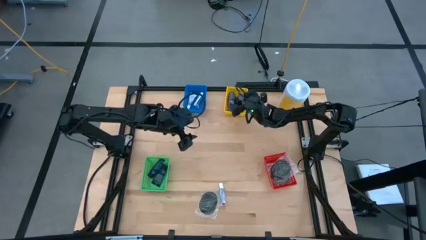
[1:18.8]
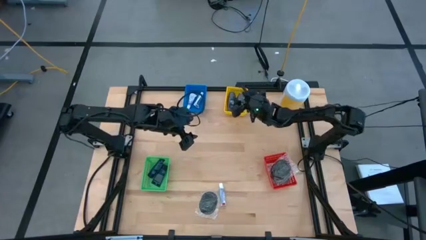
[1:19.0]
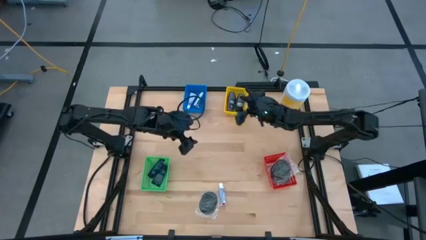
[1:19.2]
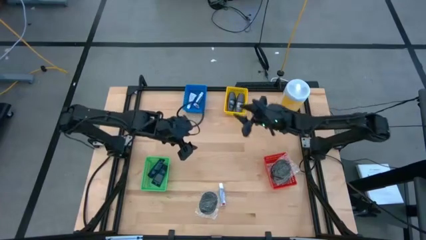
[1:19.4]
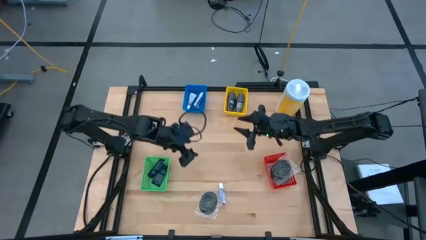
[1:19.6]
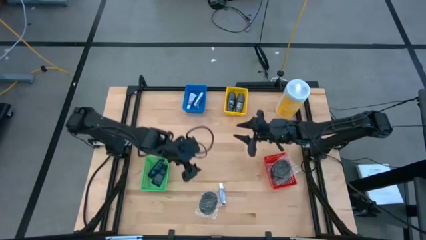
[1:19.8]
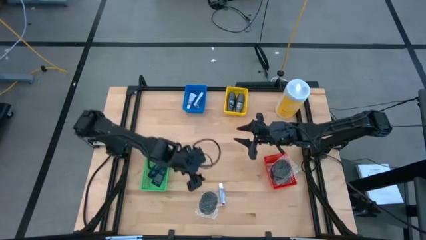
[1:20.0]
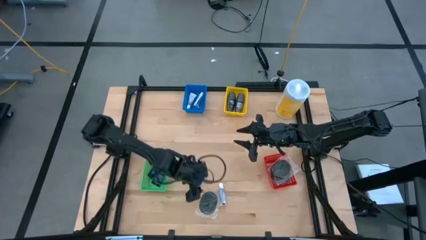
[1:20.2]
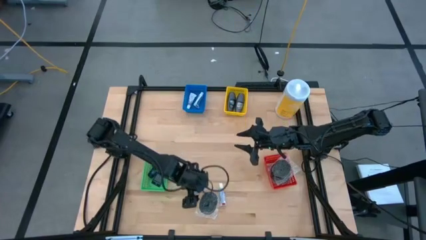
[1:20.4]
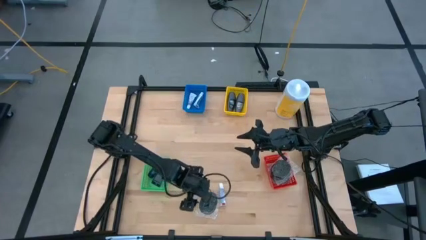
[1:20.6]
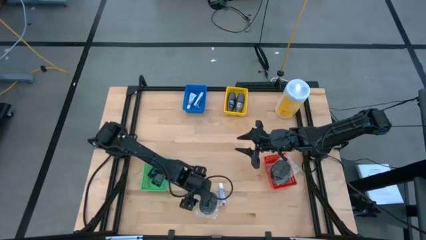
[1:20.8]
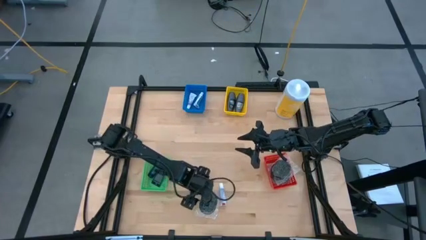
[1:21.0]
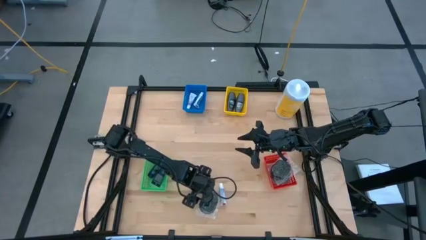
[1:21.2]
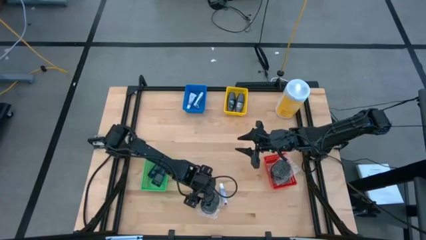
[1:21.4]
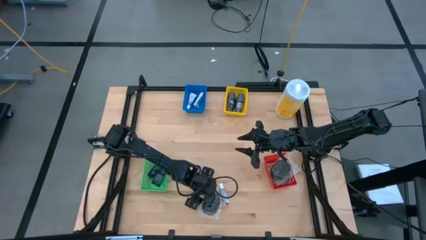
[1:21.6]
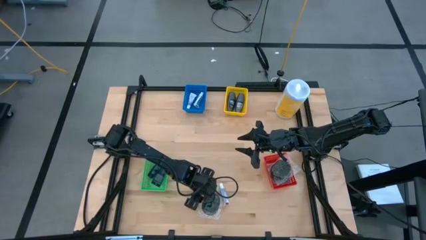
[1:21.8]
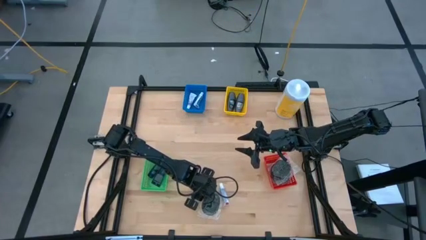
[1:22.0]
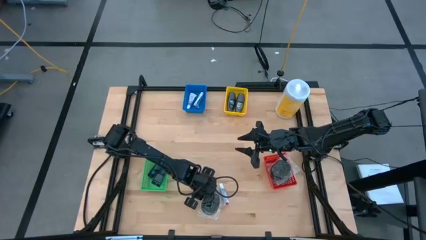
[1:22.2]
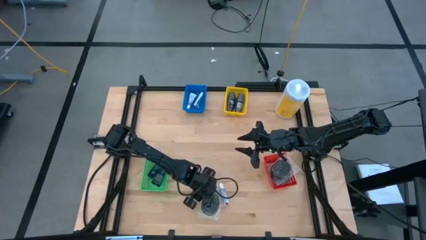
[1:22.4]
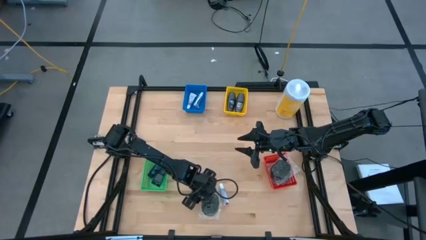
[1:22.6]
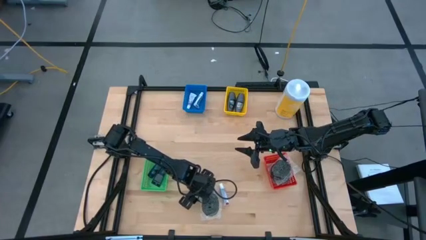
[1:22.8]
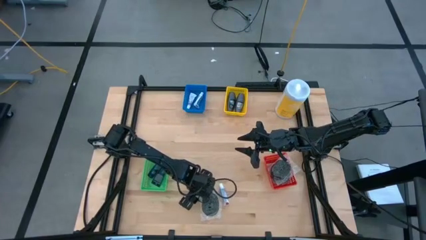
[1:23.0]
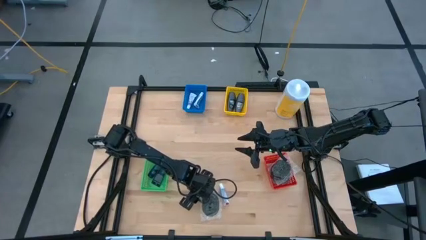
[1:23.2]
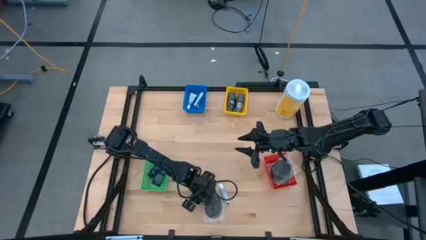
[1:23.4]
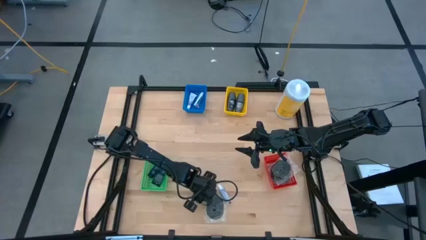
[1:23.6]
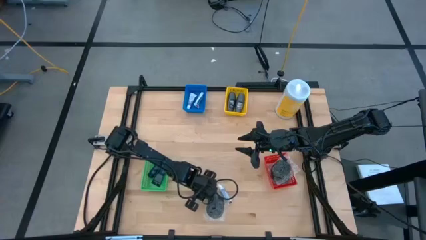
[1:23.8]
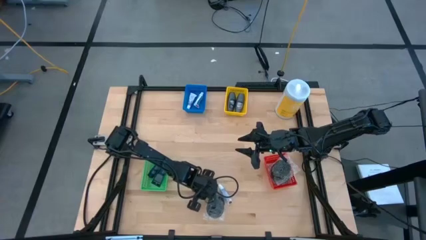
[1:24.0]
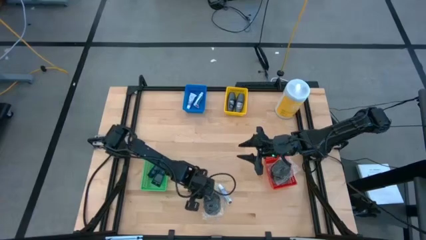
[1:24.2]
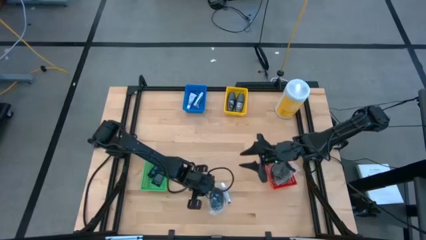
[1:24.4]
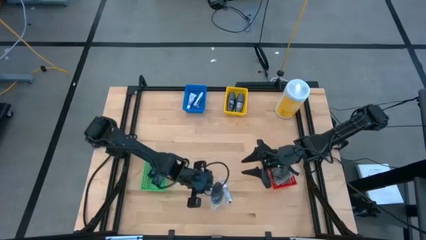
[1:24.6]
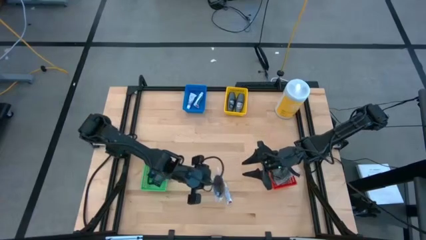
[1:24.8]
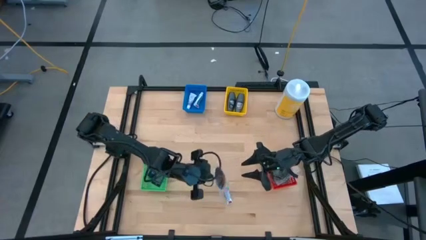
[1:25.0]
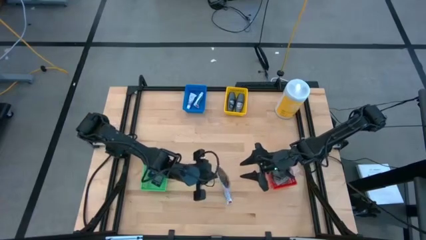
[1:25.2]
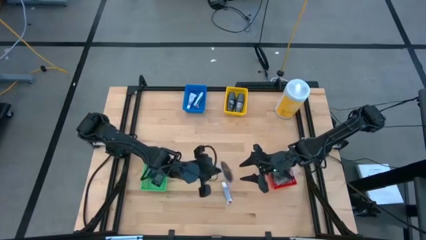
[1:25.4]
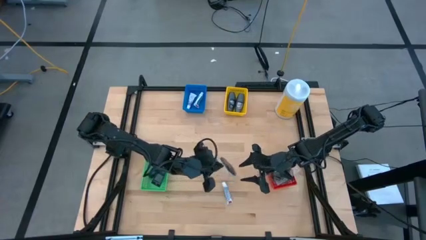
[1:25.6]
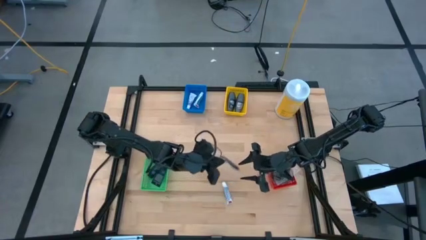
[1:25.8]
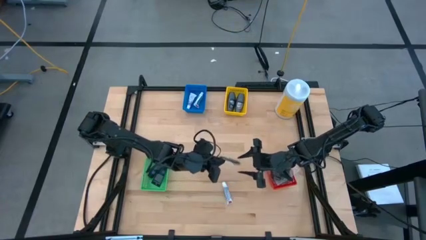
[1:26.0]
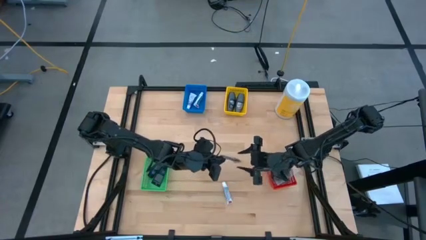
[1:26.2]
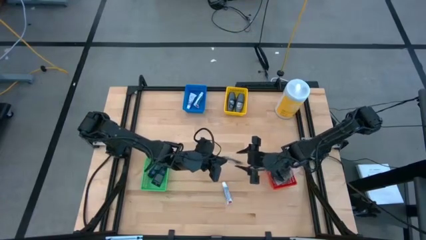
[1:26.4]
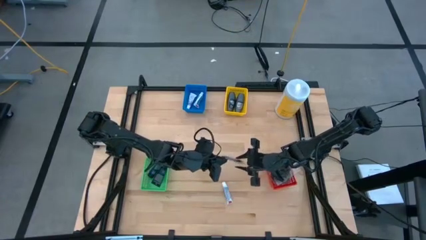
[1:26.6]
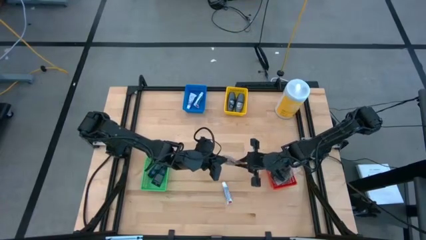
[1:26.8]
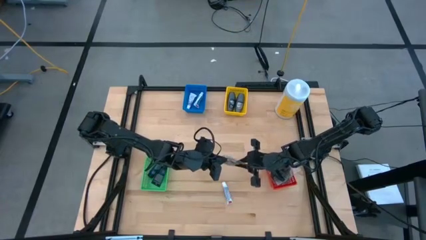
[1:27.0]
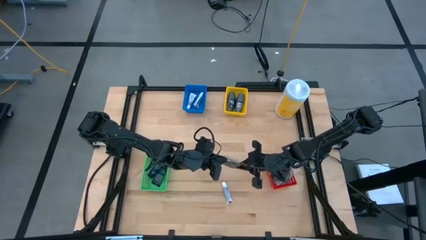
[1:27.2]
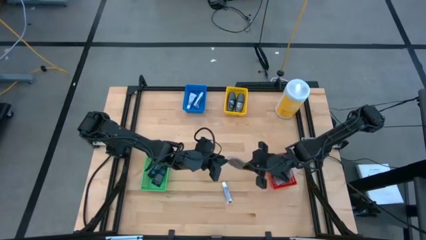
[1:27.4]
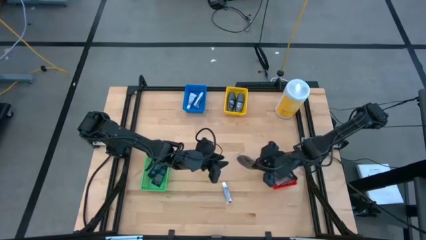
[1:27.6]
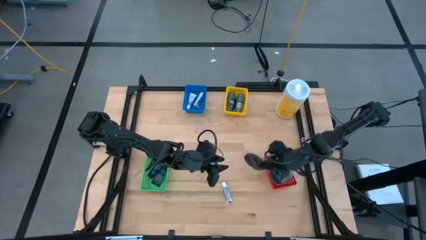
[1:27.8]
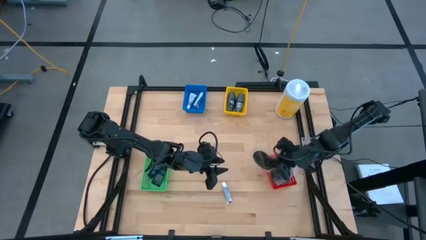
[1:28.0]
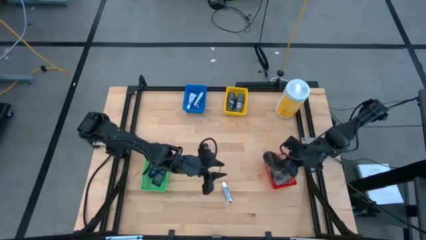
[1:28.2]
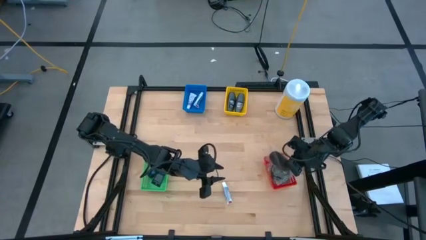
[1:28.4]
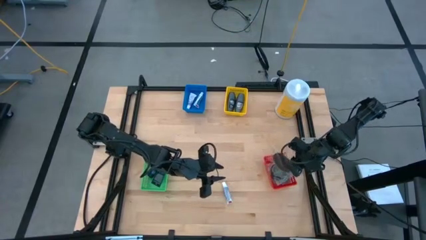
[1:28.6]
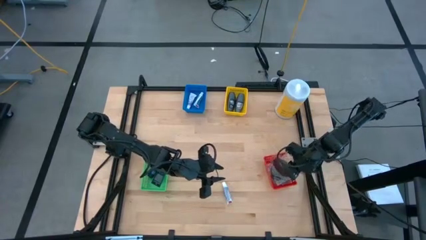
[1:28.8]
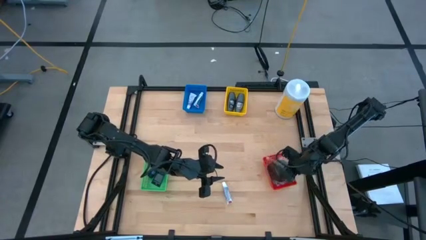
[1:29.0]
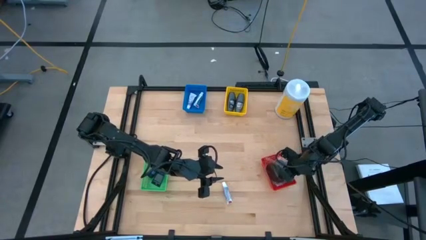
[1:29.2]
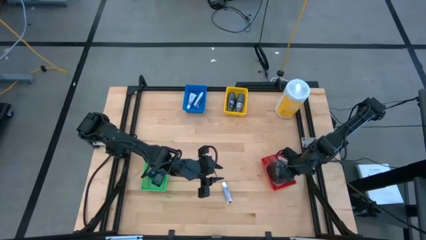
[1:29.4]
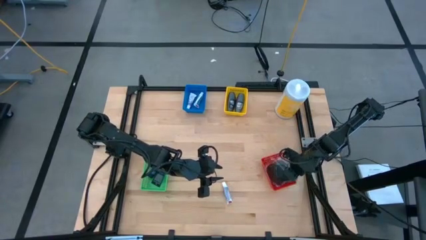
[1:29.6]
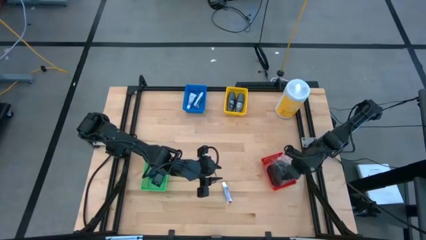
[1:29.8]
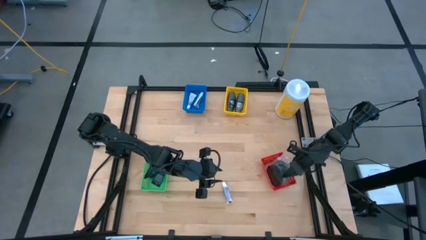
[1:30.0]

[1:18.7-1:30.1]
Task: Pick & Place Travel size toiletries
Put the black hairbrush into the red basket

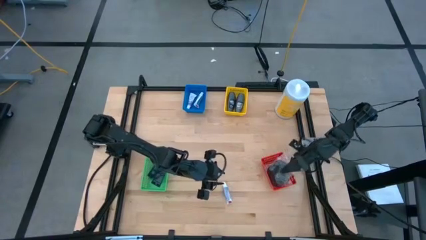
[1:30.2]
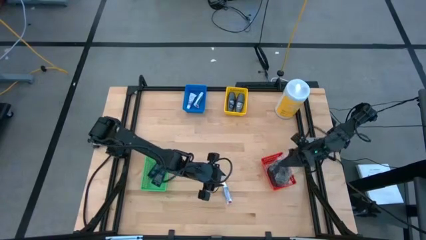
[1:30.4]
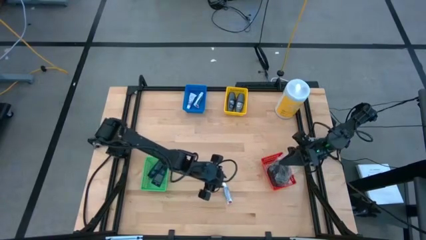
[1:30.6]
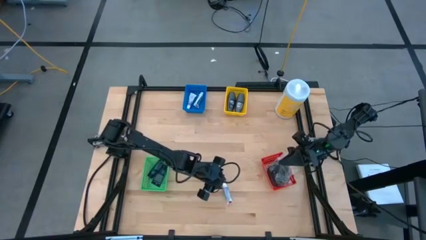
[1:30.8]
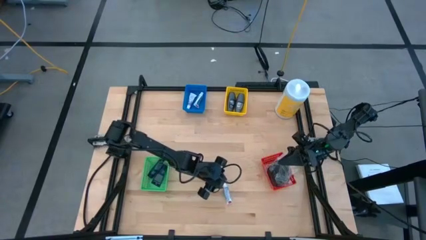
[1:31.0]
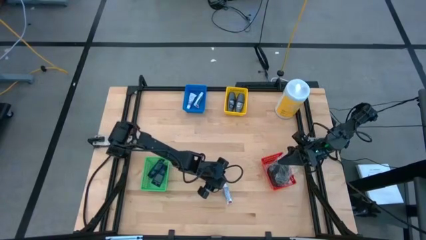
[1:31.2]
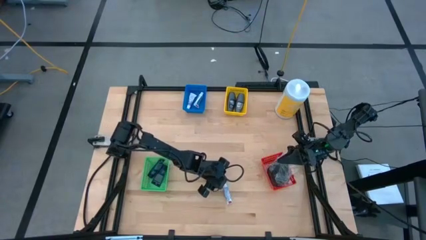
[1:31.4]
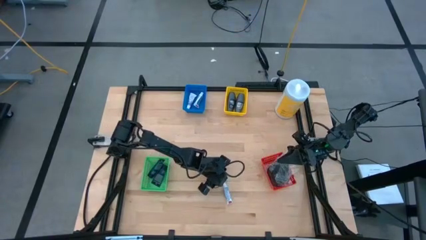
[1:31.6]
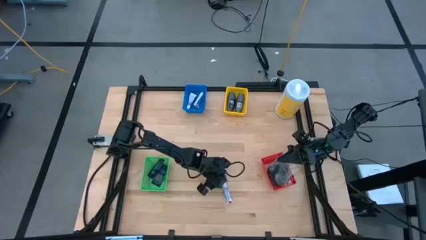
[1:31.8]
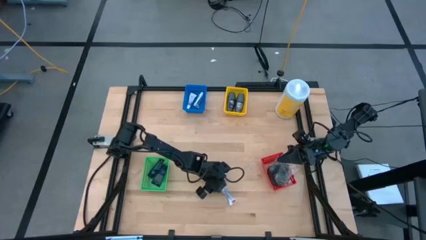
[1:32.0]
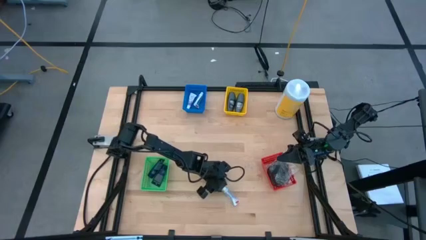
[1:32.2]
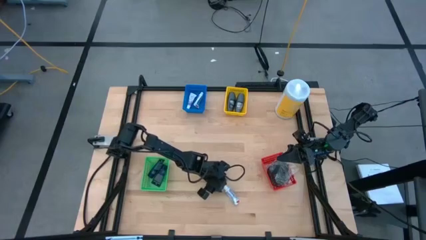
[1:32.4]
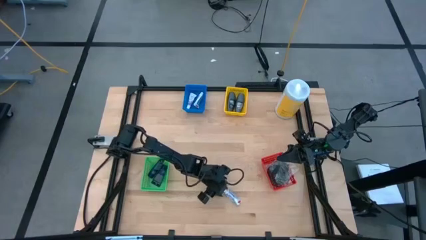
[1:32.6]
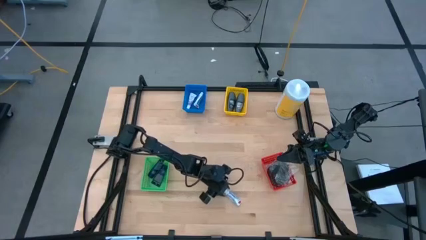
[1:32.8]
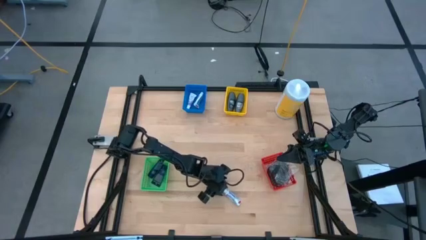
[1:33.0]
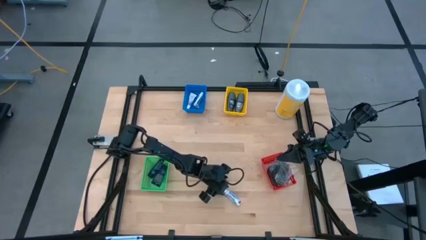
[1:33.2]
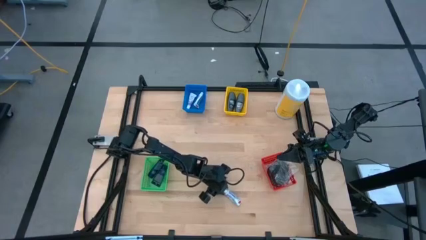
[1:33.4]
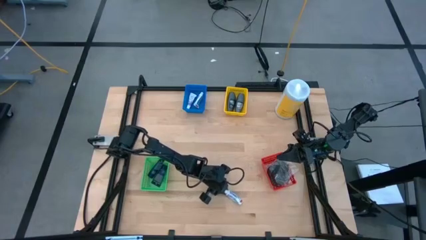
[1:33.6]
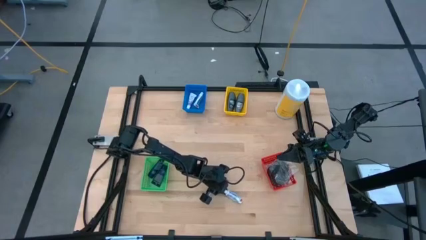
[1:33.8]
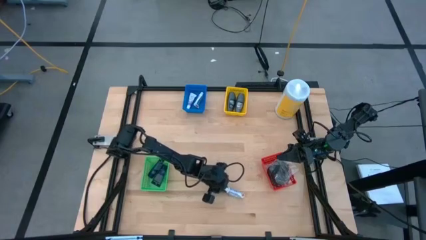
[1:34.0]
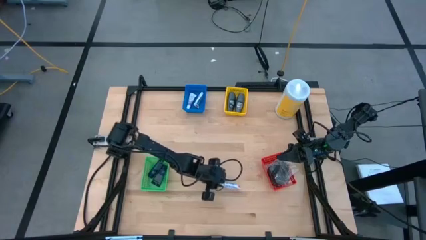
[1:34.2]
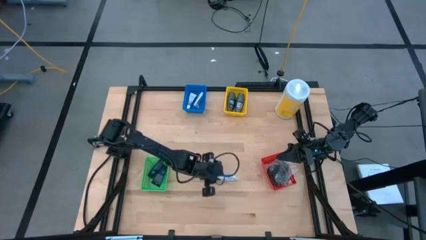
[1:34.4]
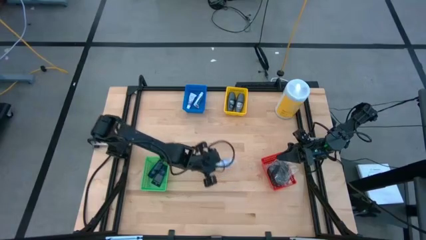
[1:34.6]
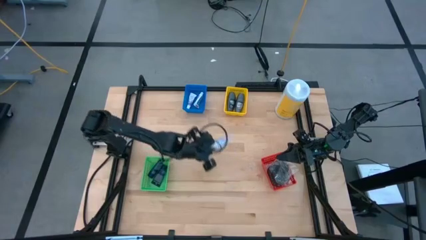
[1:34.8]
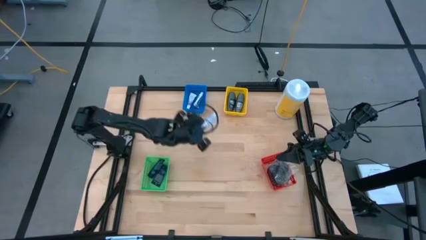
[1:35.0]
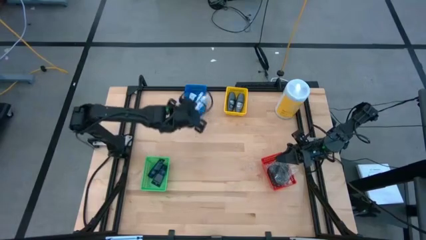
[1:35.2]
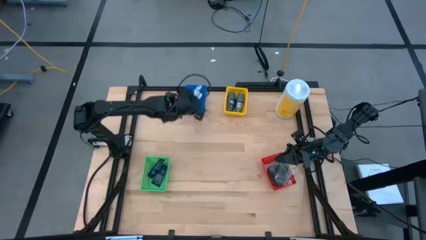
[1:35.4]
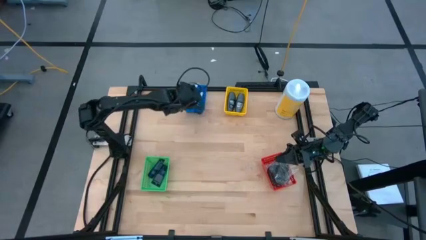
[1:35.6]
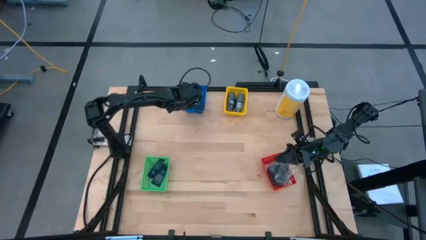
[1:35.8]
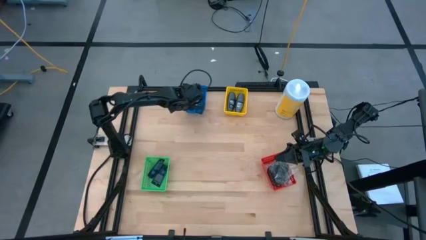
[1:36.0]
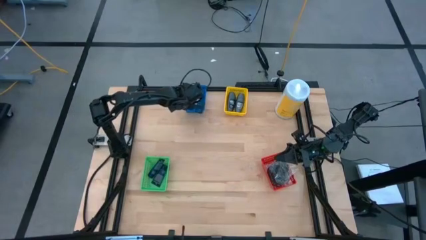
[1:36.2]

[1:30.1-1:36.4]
Put the white toothpaste into the blue basket
